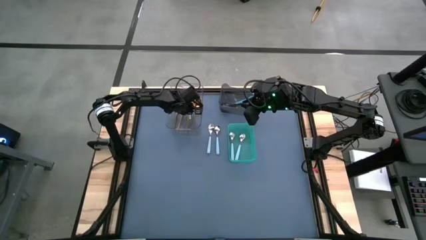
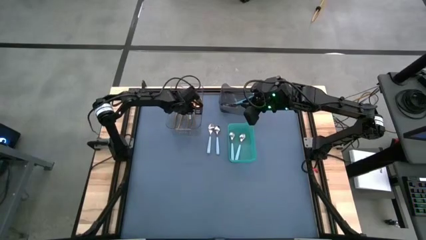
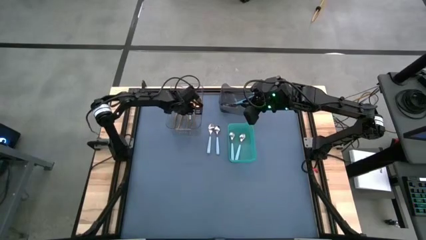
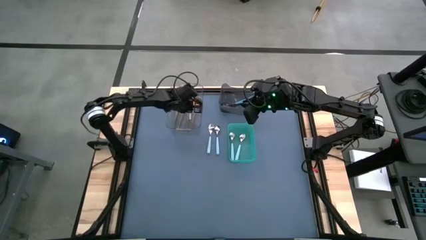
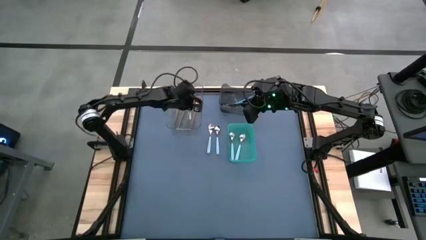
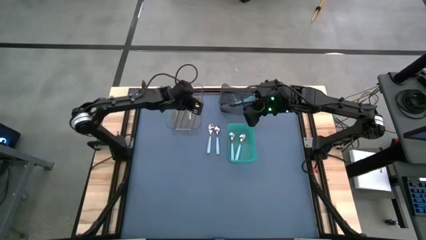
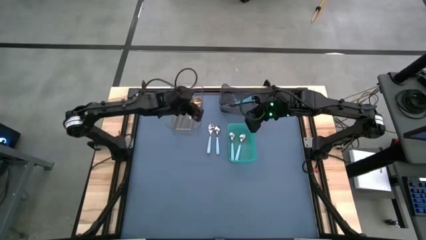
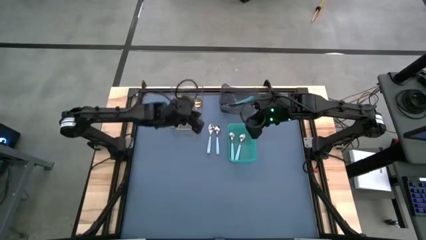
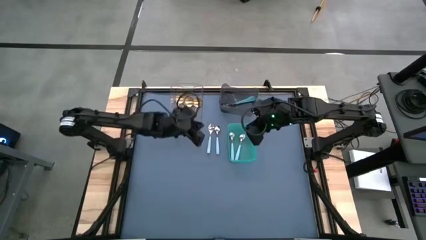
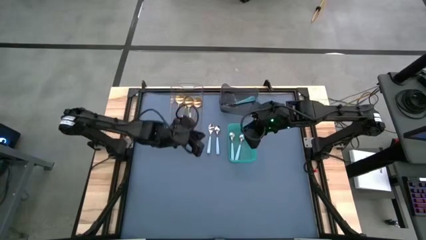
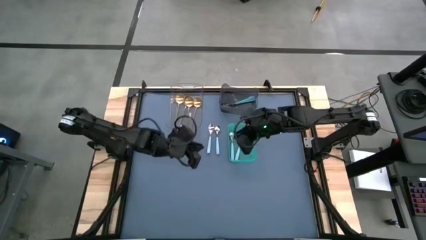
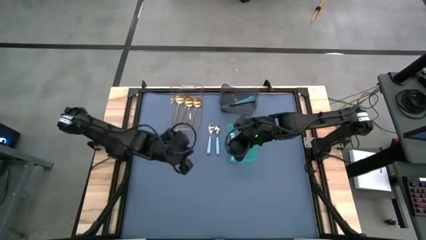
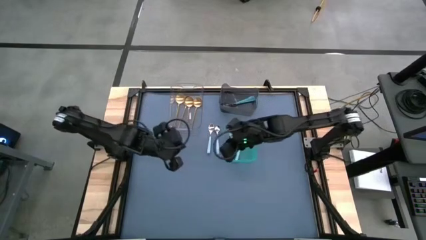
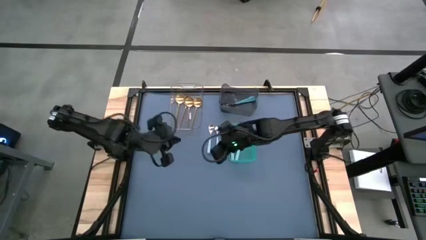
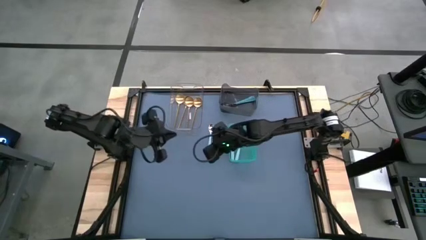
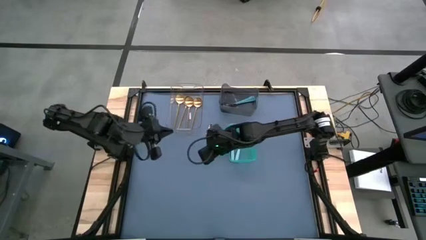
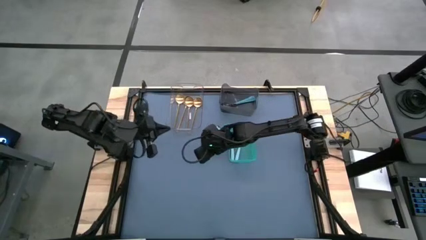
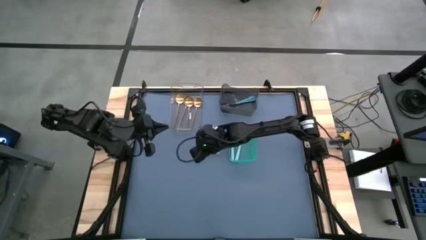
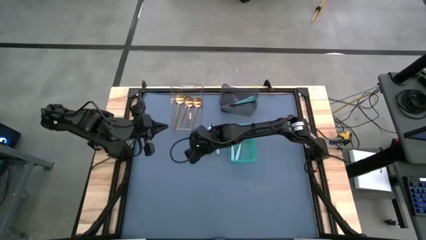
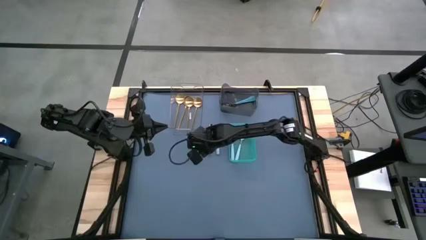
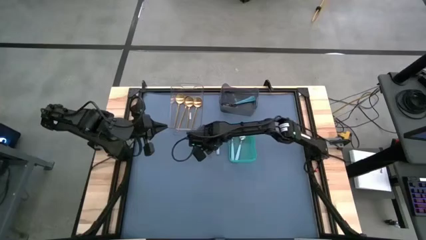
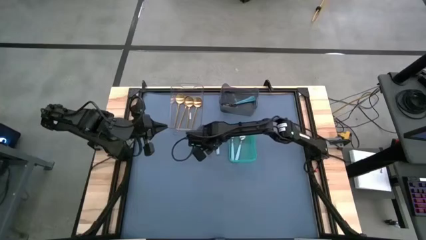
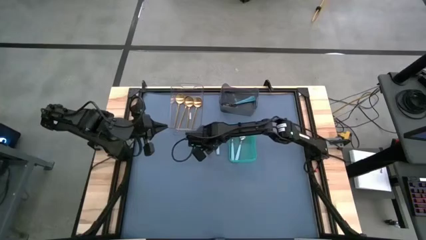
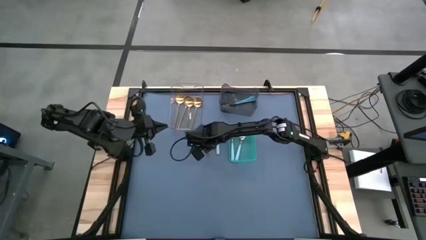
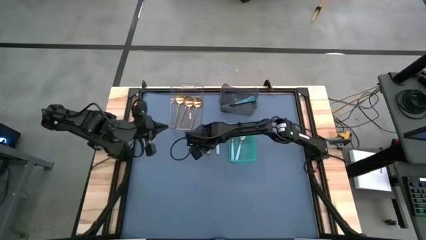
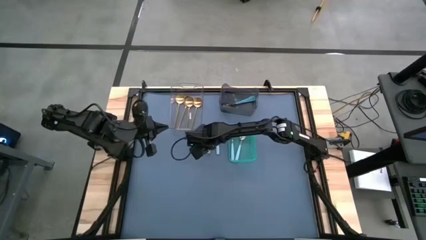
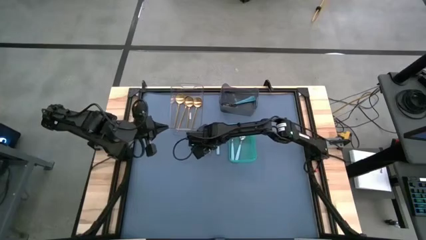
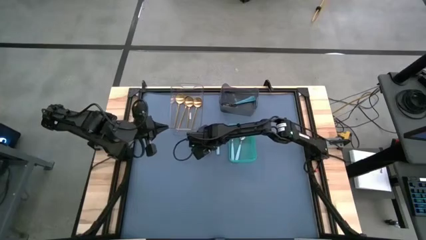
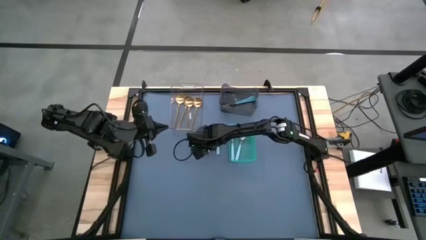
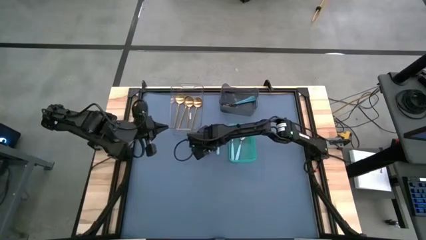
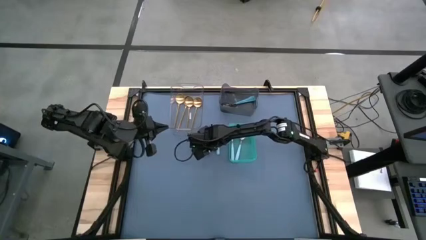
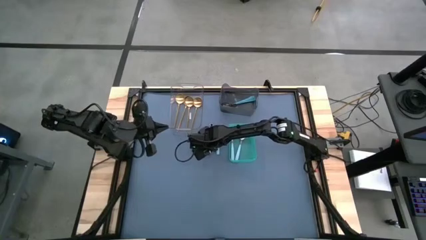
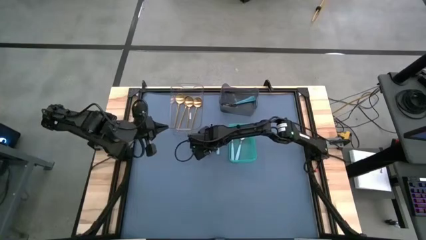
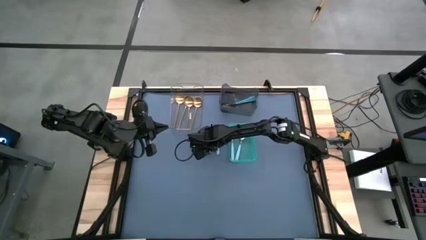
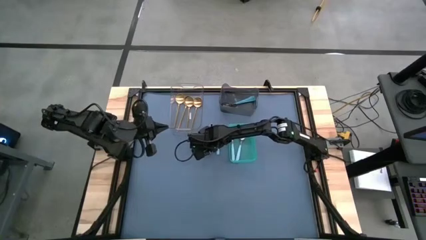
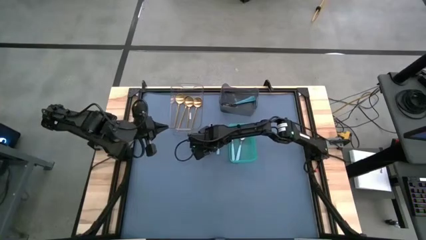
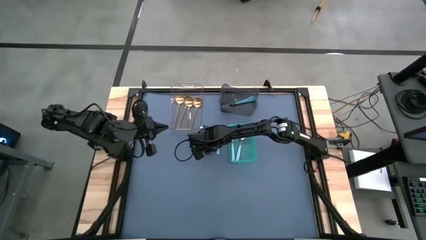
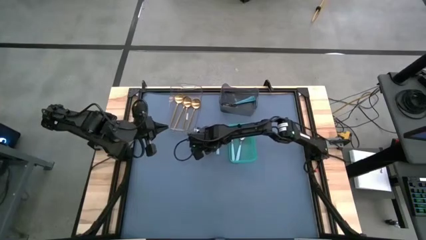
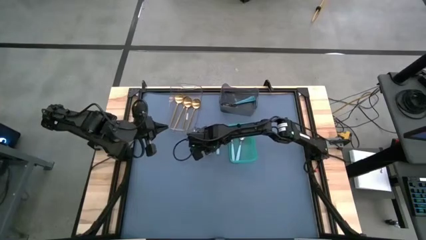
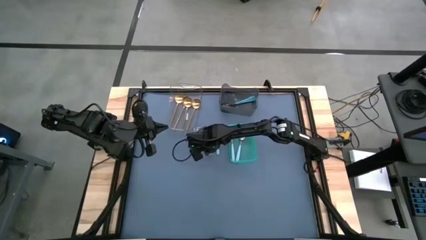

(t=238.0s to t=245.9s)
Task: Sort silverware by color (type)
Put the light blue spoon into the green bin

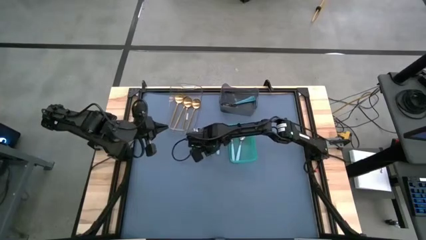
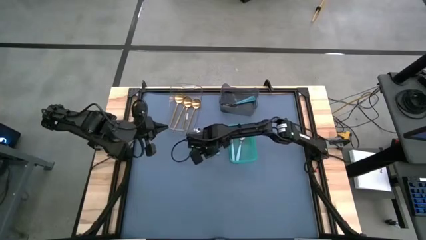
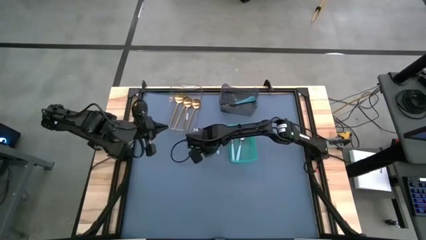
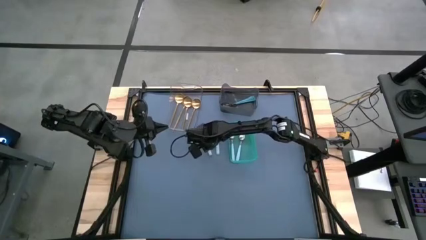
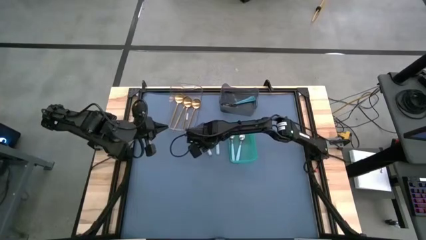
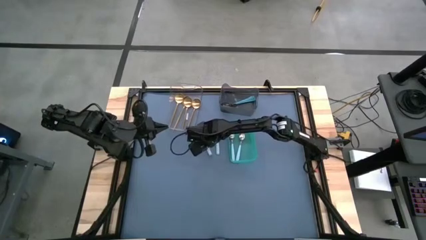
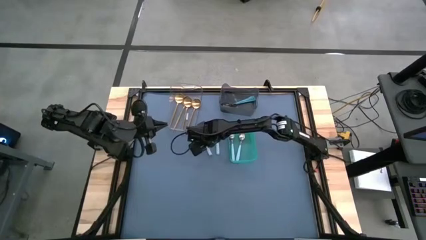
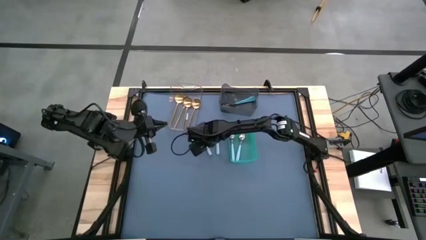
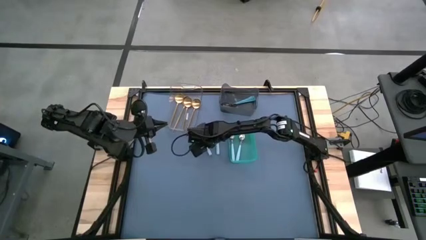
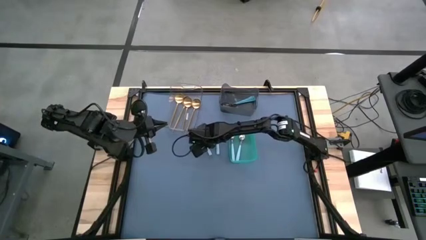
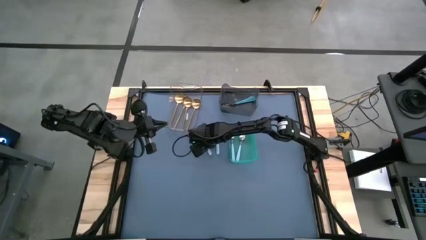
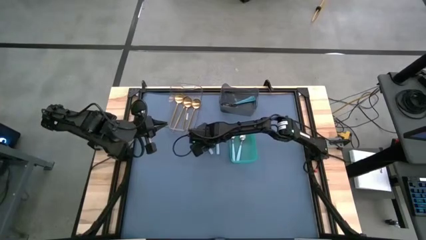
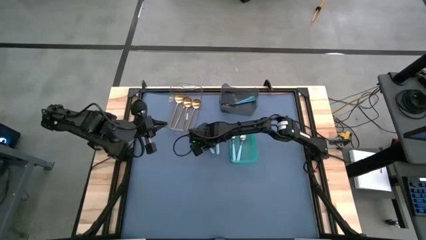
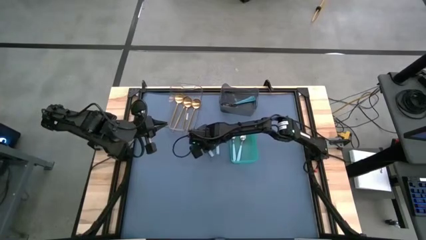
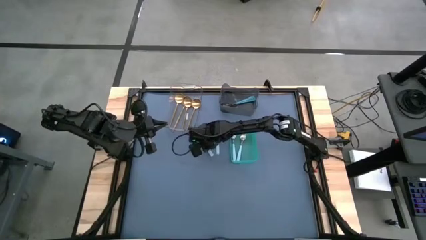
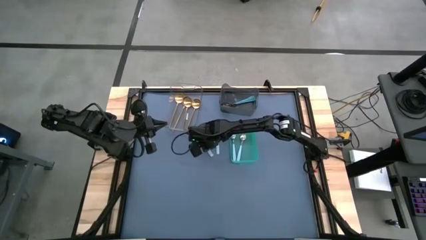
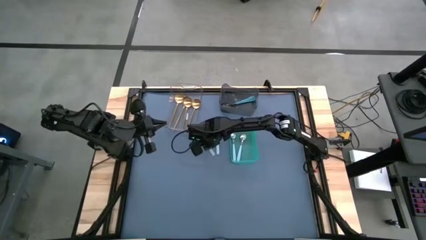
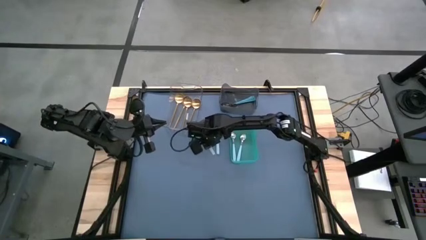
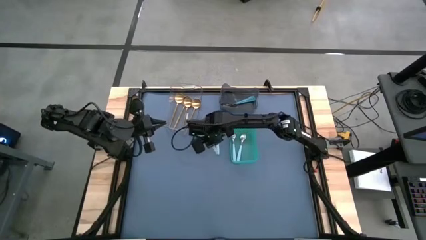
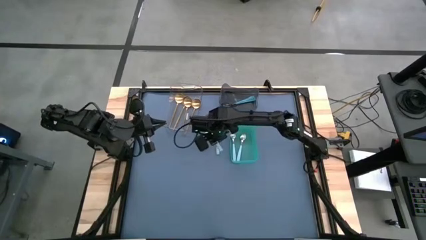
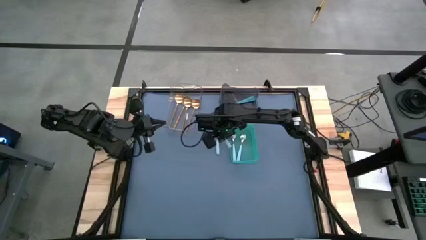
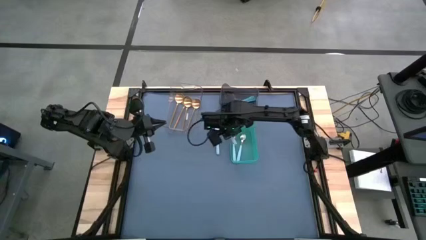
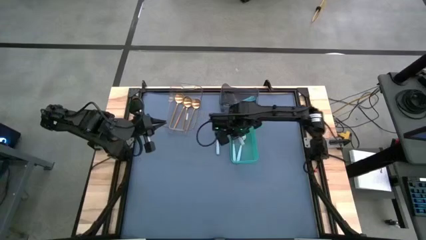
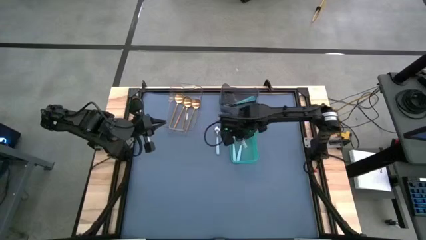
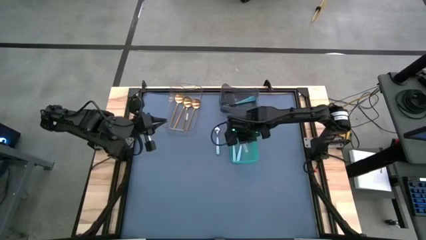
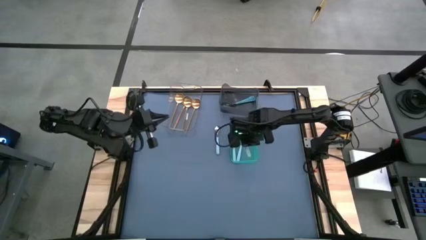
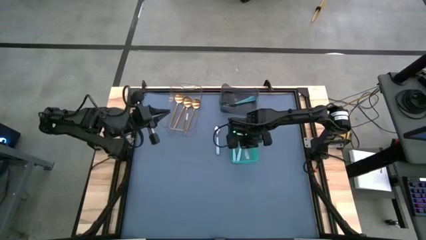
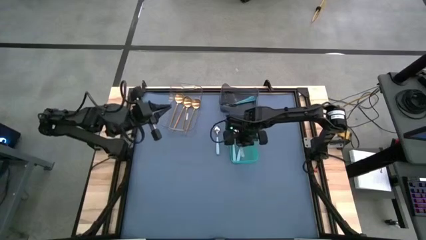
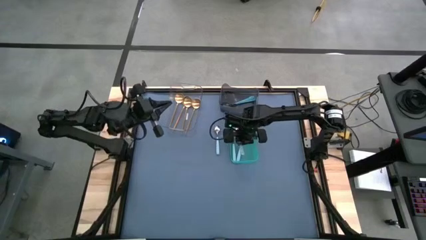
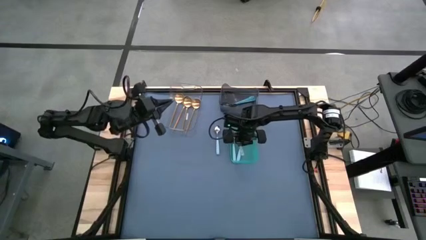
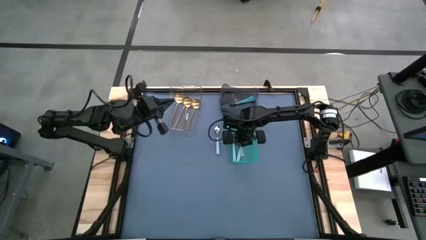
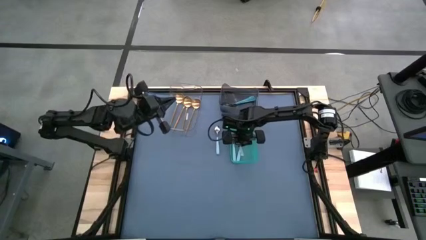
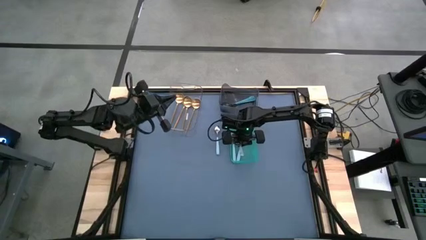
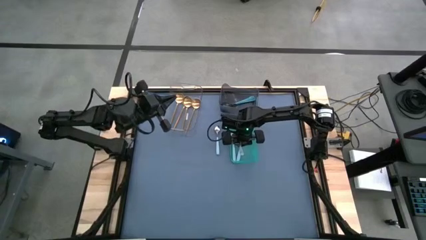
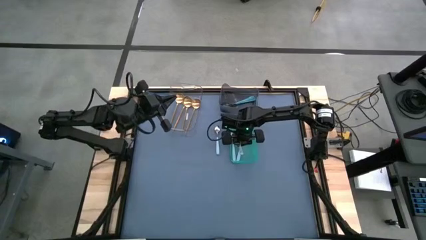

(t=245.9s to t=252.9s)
Put the light blue spoon into the green bin
